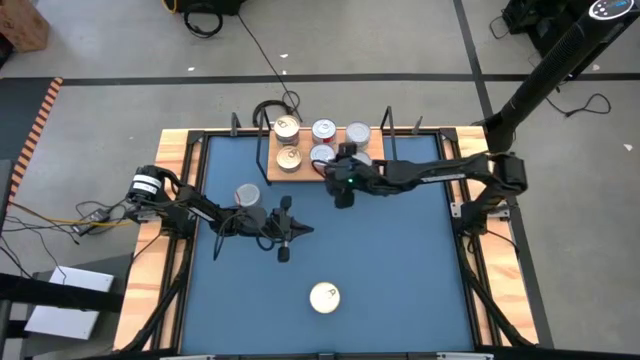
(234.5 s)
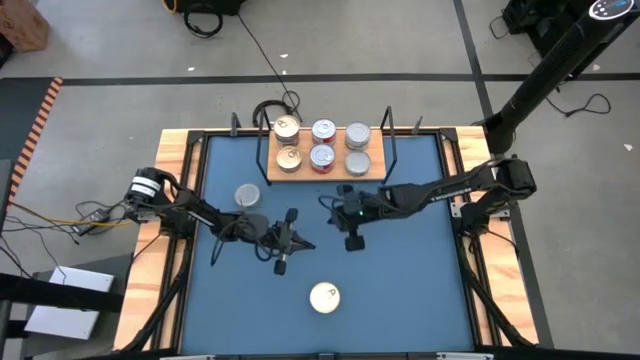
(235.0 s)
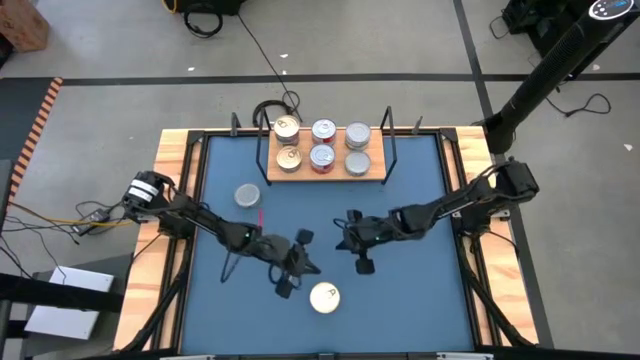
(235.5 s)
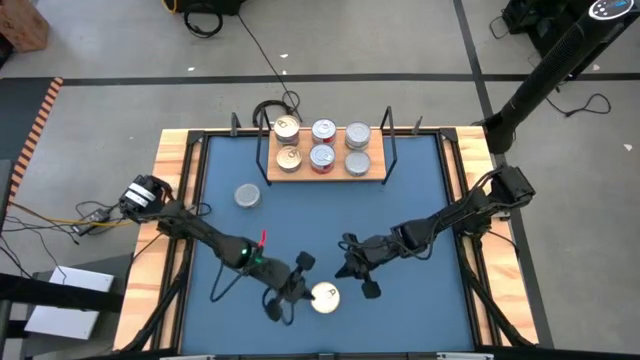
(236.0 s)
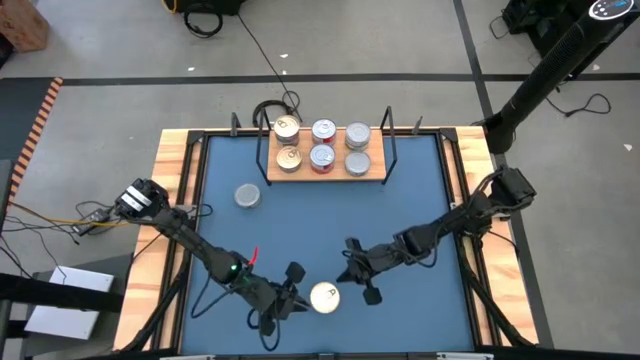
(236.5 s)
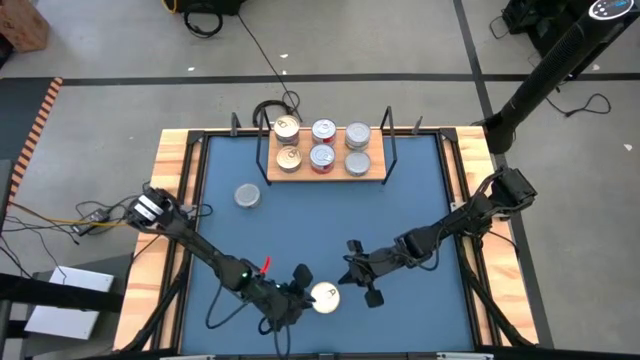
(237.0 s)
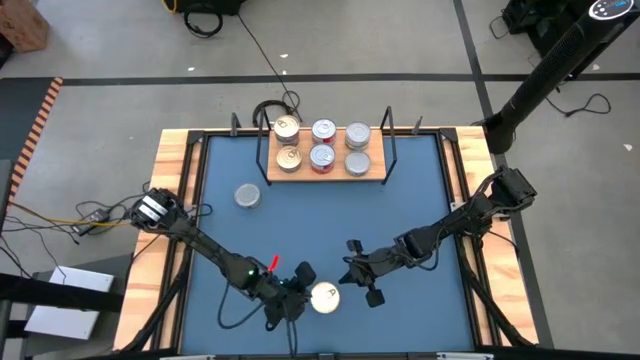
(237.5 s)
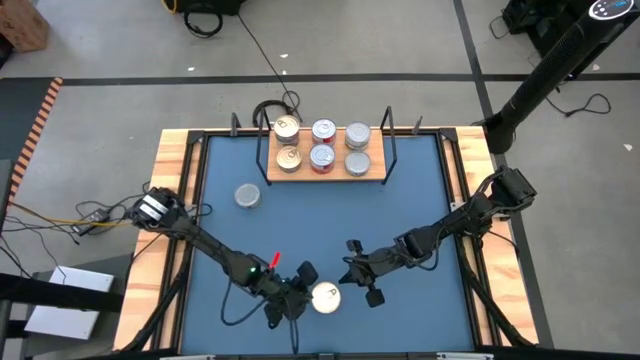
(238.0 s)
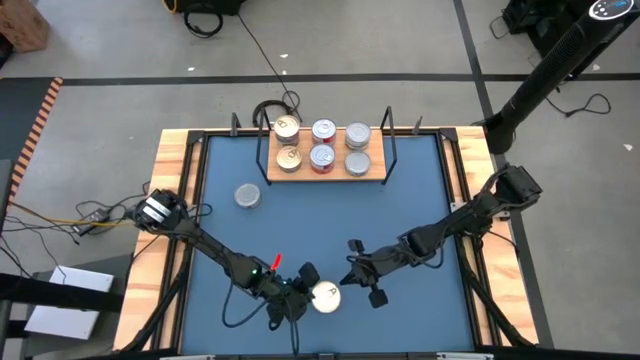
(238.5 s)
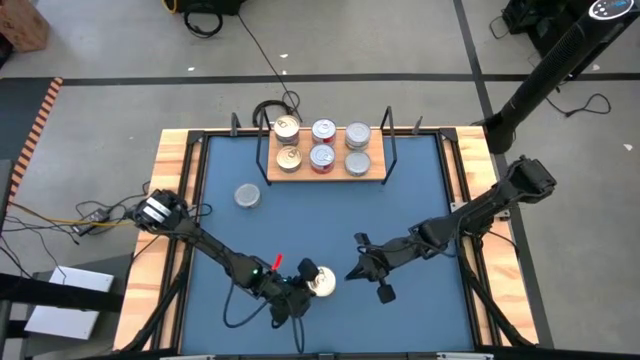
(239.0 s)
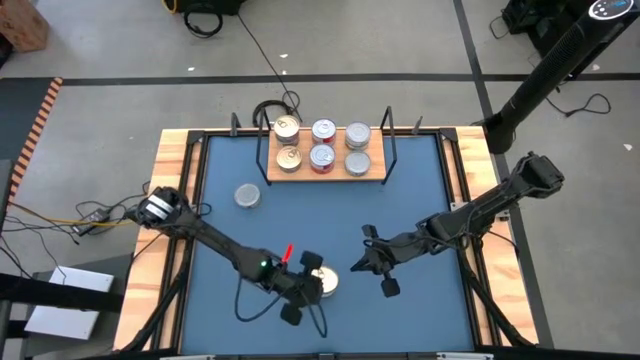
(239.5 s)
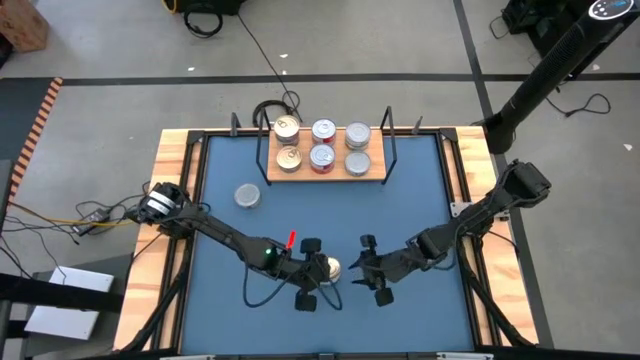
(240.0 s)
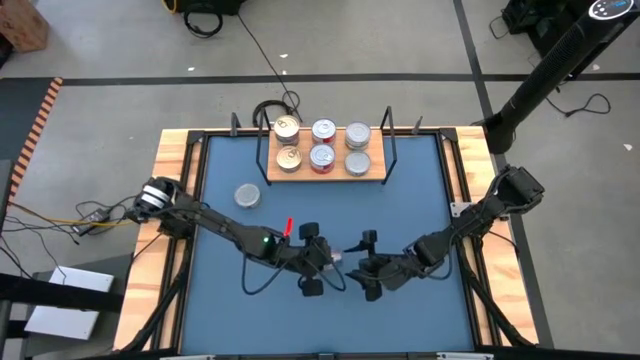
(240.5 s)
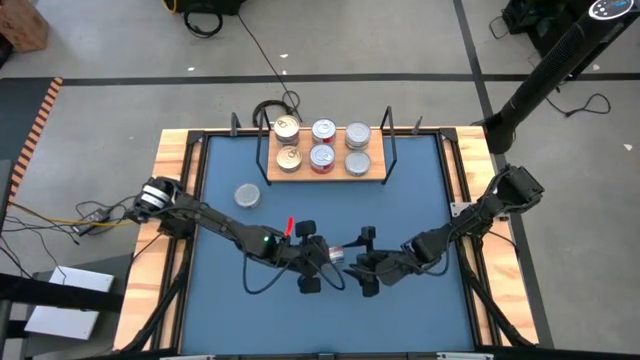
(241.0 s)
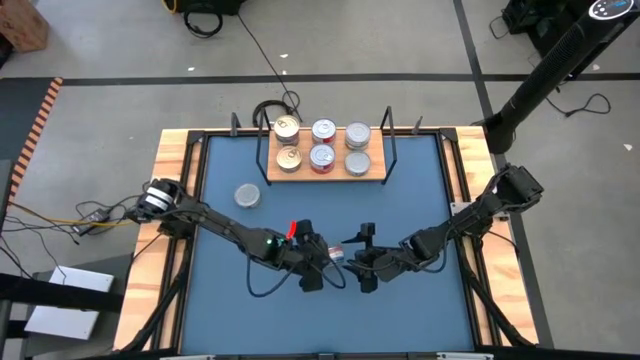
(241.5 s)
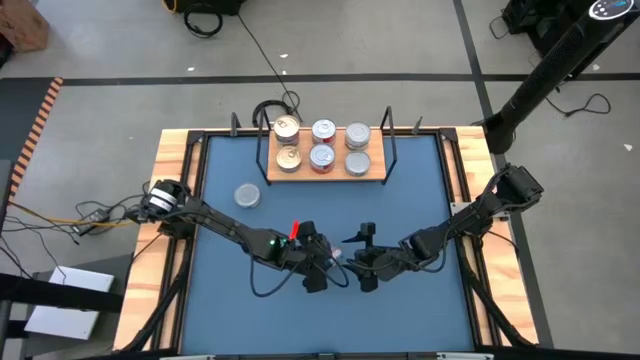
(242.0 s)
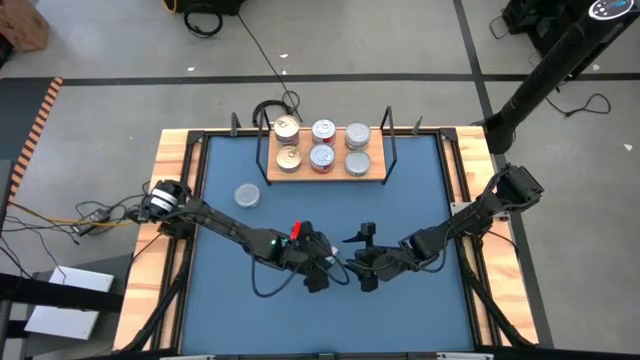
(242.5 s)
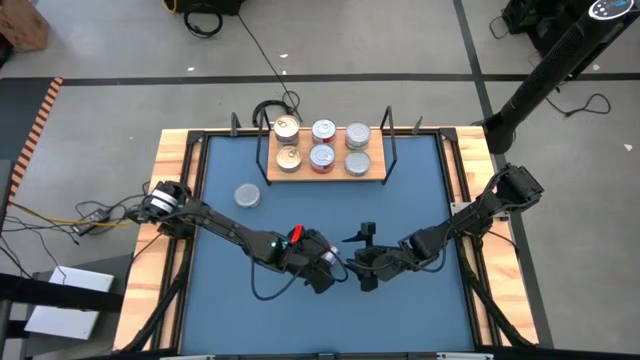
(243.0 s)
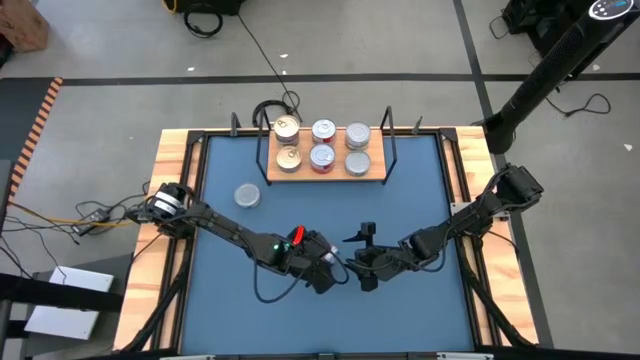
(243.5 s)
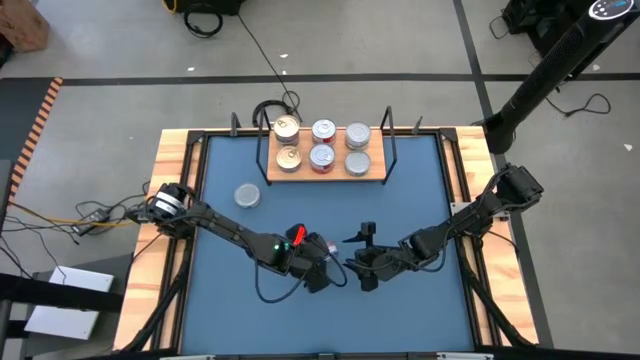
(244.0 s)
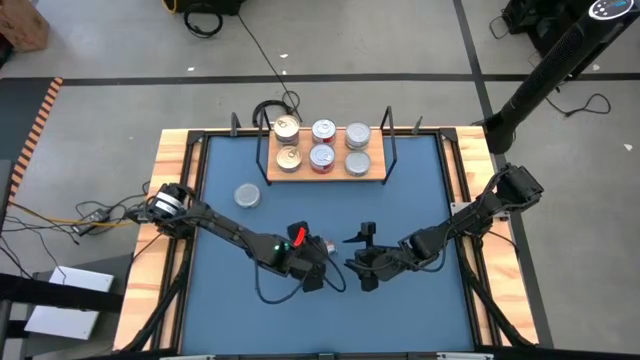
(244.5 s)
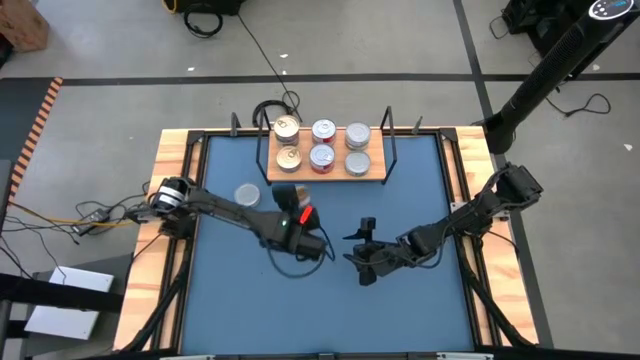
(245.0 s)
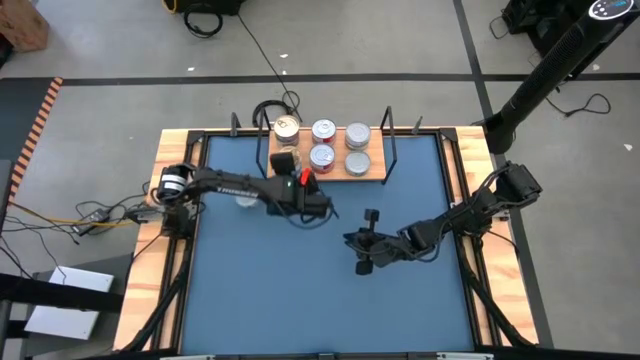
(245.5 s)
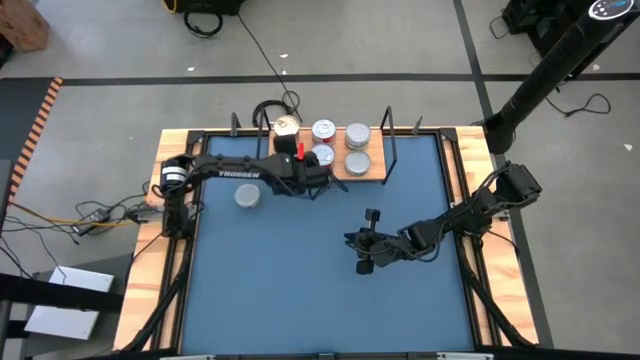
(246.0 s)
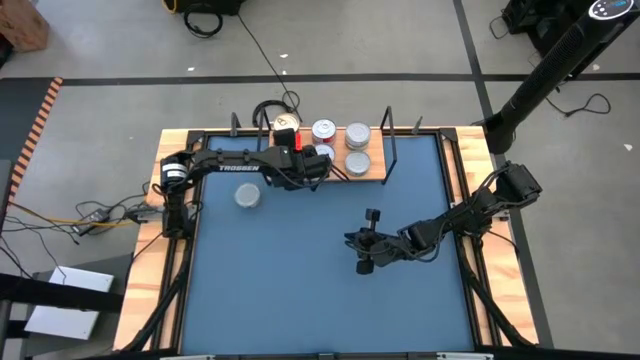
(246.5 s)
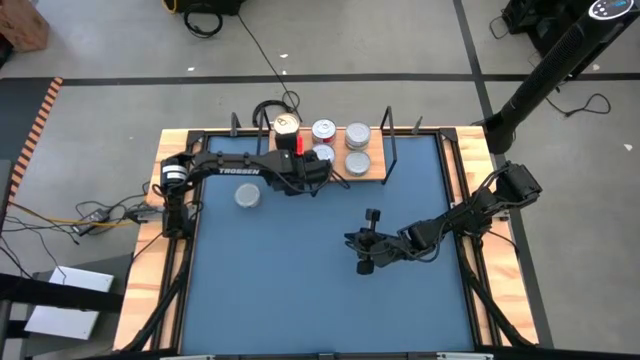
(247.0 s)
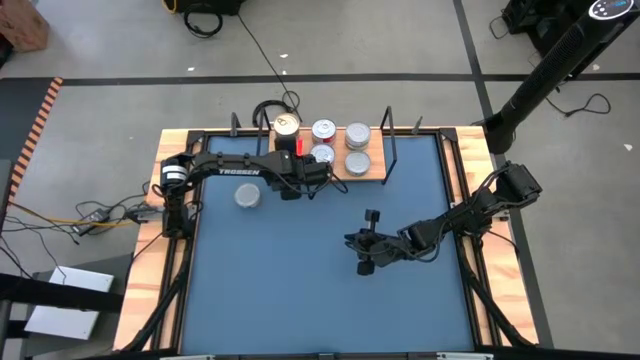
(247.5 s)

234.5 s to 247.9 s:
Task: Stack canned seafood by type on shelf
Stack the blue tuna can on the bottom blue tuna can on the shelf

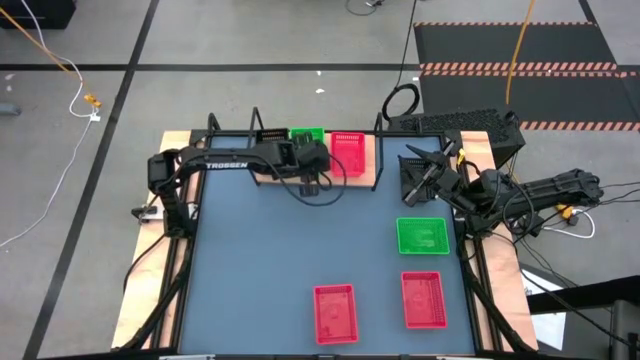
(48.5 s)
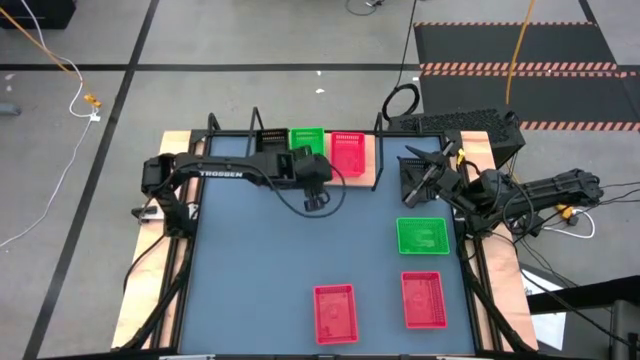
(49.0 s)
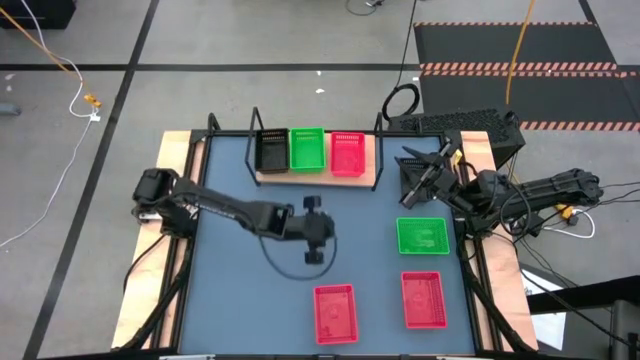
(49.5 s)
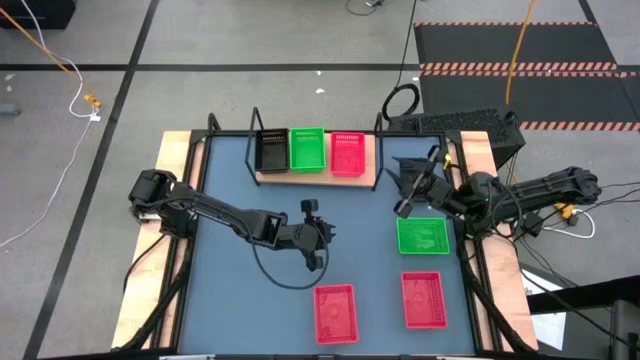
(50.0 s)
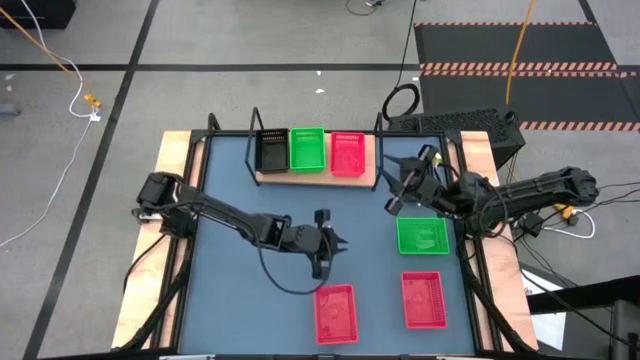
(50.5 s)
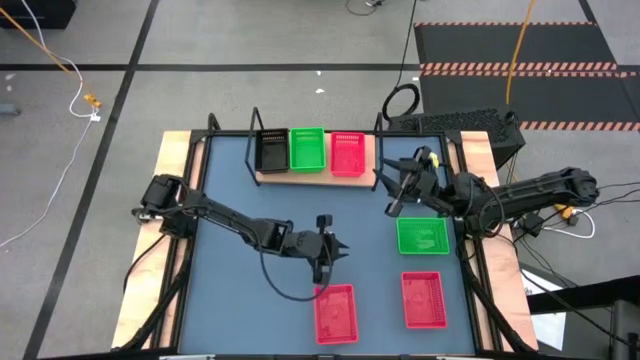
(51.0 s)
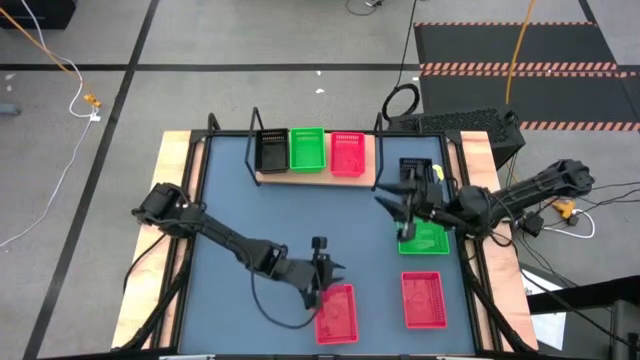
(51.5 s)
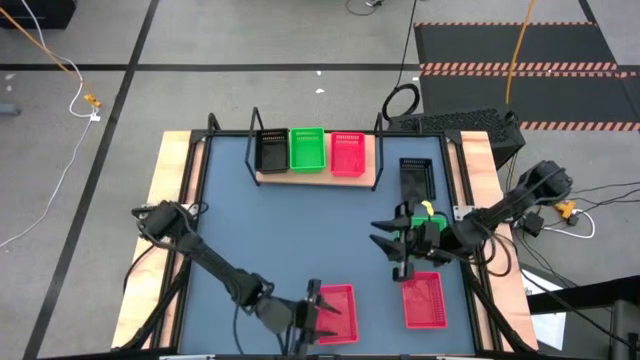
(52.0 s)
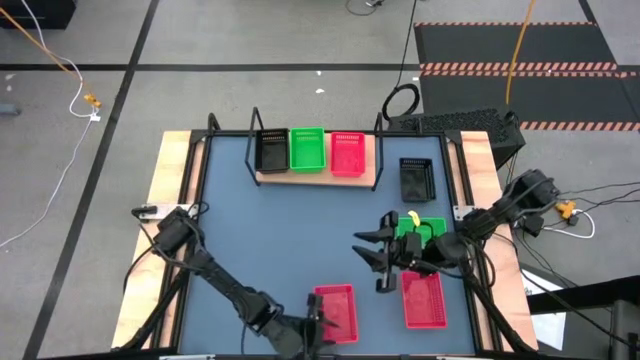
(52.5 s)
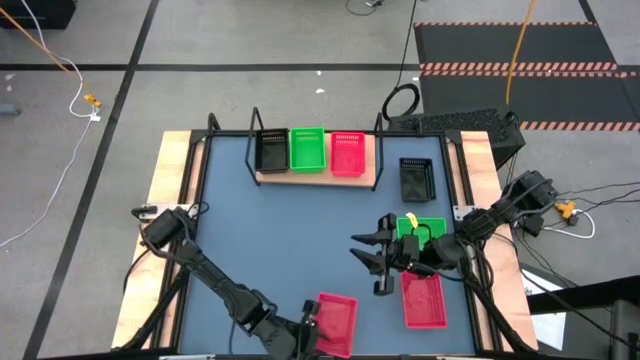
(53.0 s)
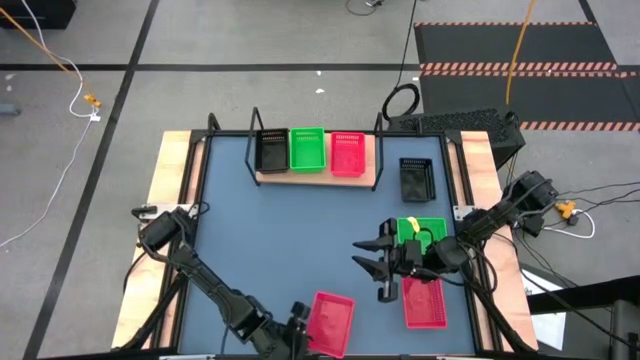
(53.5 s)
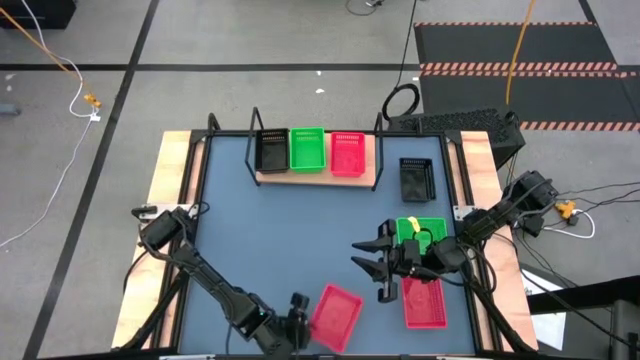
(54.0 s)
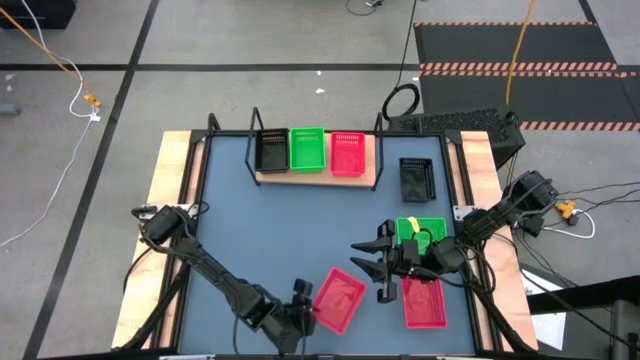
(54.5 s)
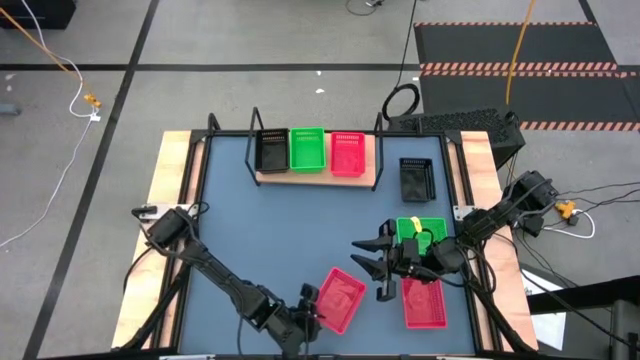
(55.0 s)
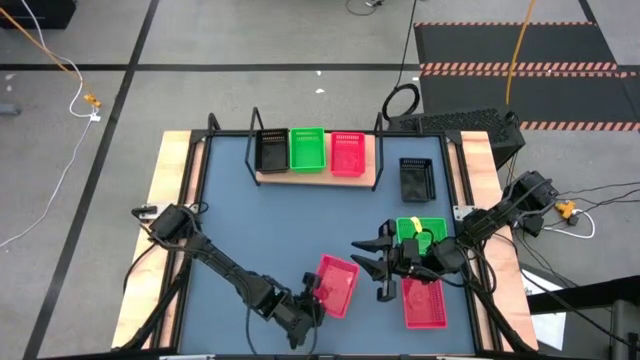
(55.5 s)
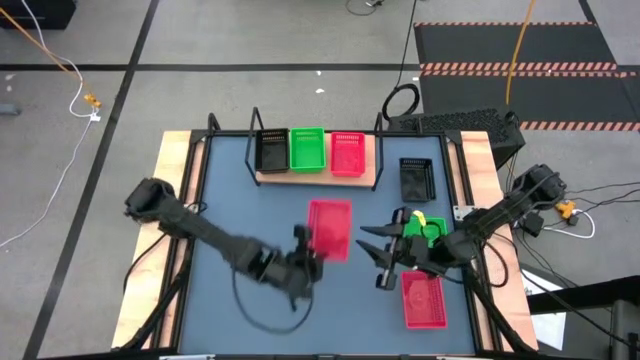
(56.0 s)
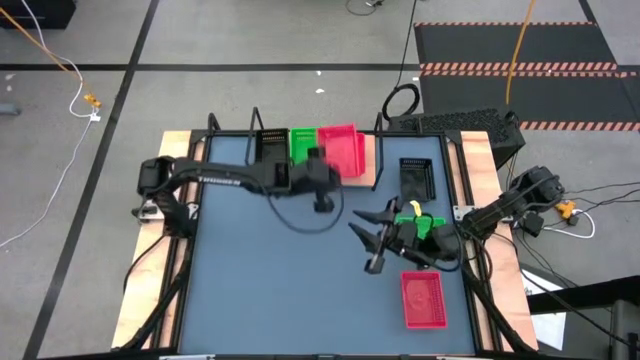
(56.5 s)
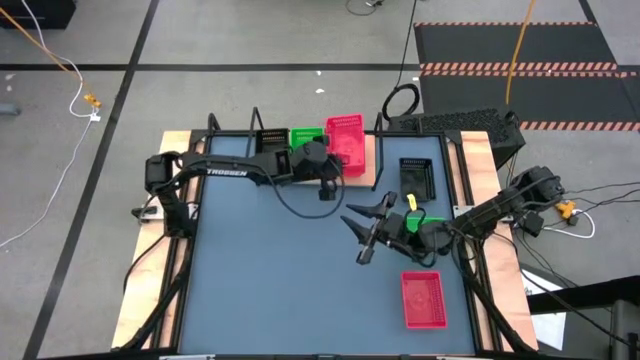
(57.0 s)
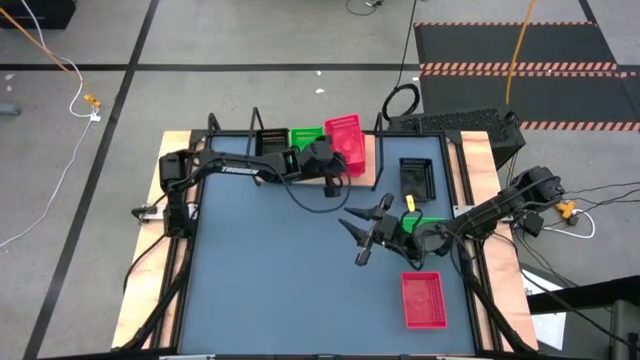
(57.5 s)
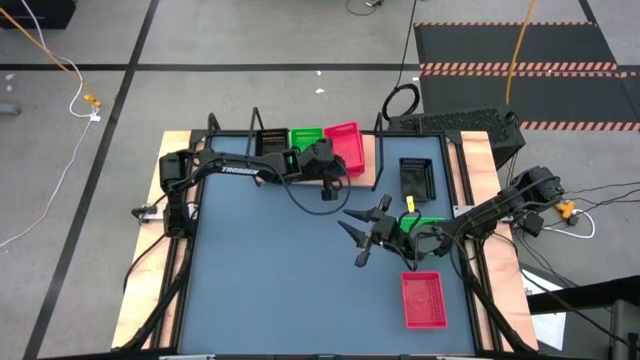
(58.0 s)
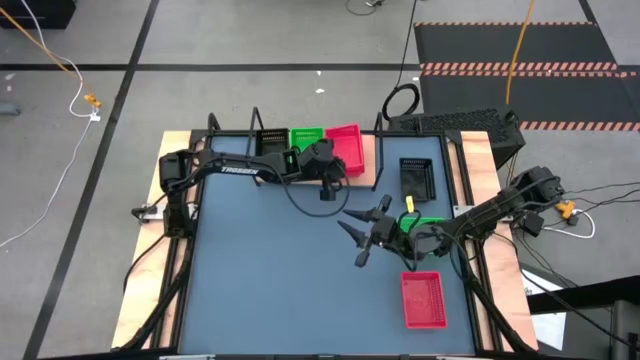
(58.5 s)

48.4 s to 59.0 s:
Task: Stack baskets on shelf by color
Stack the left red bin on top of the red bin on the shelf
